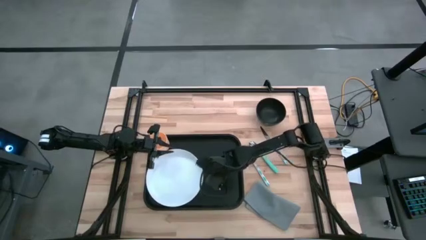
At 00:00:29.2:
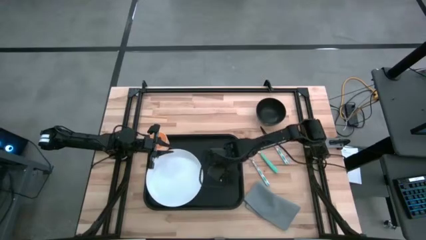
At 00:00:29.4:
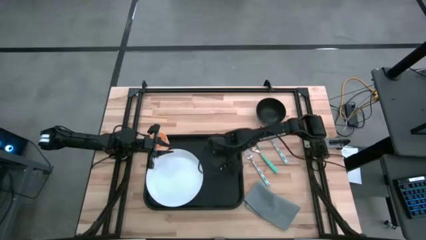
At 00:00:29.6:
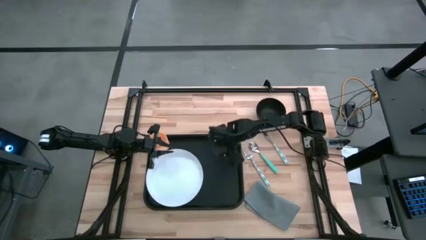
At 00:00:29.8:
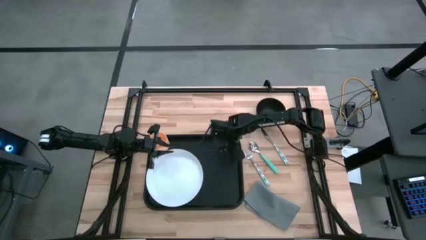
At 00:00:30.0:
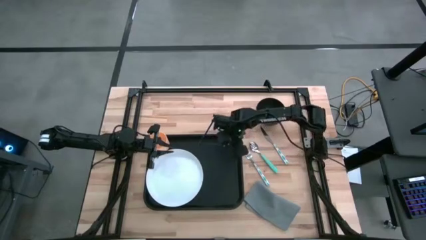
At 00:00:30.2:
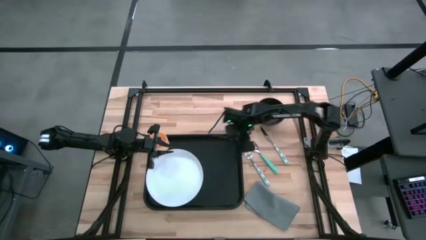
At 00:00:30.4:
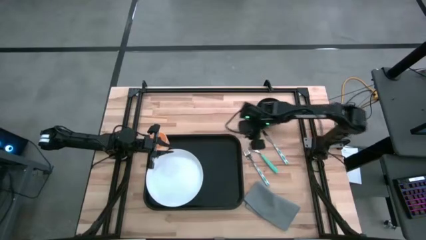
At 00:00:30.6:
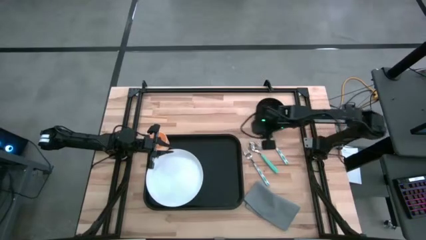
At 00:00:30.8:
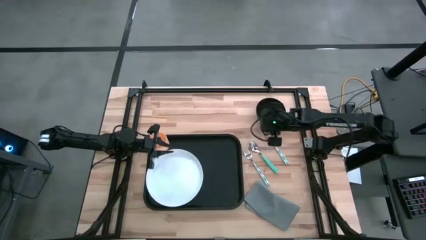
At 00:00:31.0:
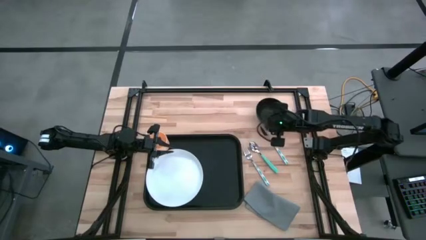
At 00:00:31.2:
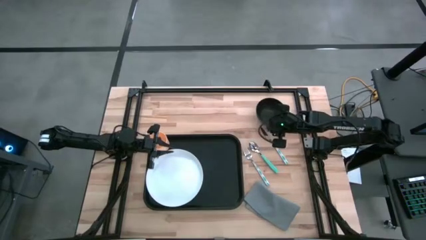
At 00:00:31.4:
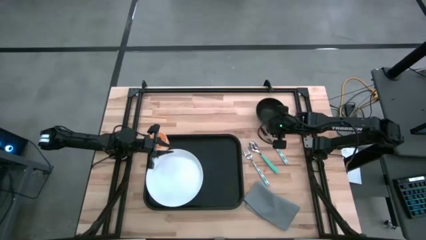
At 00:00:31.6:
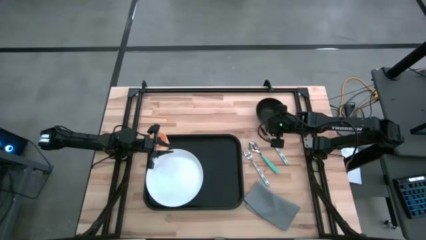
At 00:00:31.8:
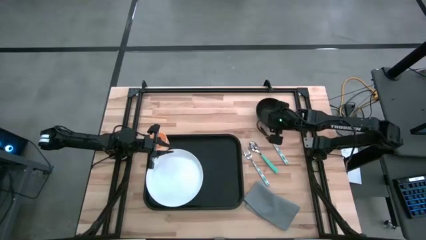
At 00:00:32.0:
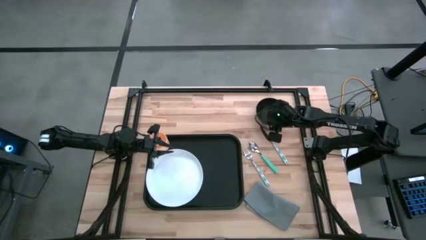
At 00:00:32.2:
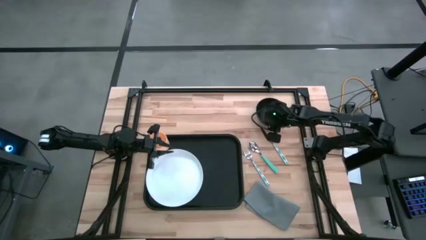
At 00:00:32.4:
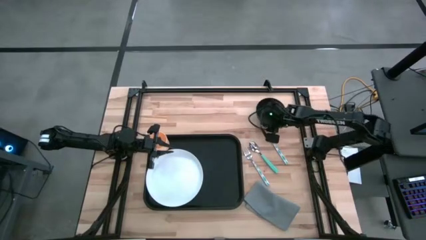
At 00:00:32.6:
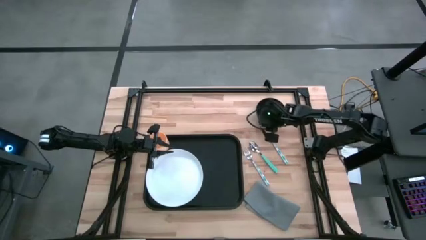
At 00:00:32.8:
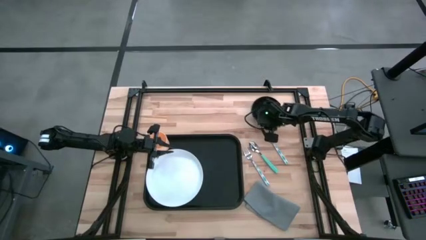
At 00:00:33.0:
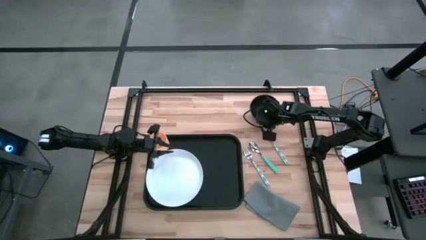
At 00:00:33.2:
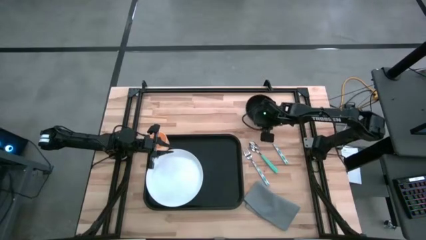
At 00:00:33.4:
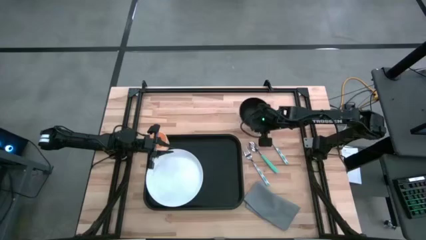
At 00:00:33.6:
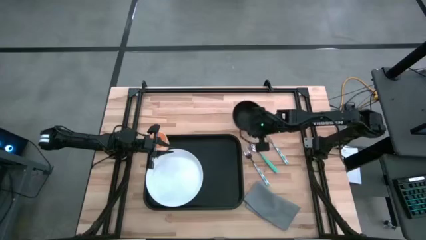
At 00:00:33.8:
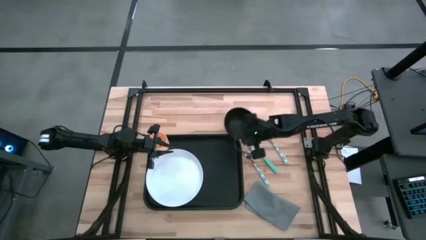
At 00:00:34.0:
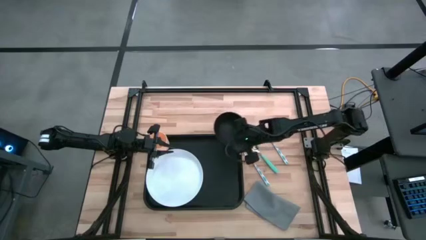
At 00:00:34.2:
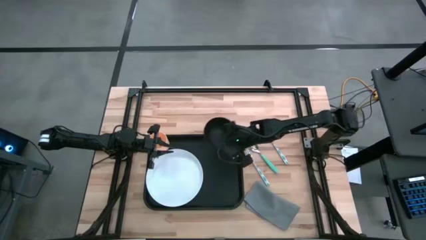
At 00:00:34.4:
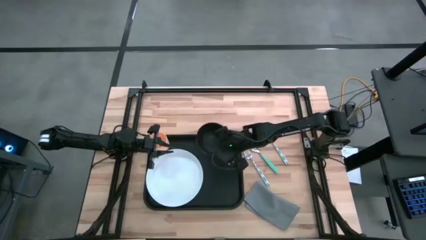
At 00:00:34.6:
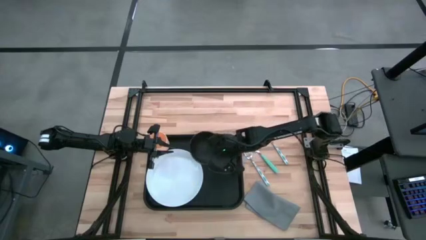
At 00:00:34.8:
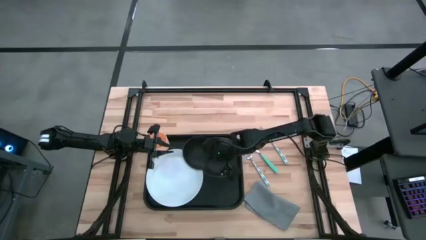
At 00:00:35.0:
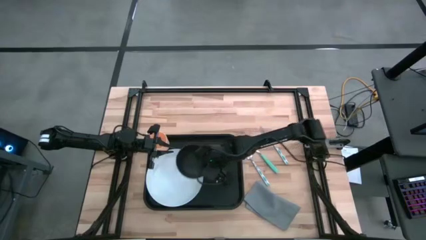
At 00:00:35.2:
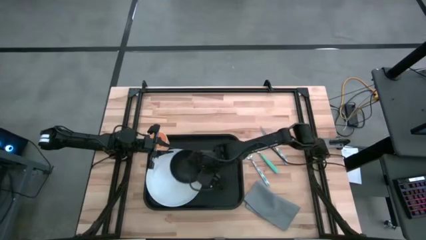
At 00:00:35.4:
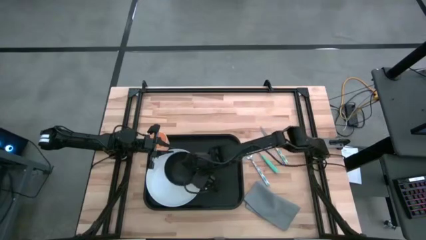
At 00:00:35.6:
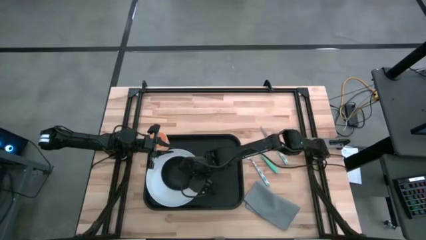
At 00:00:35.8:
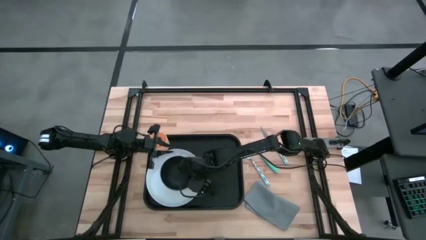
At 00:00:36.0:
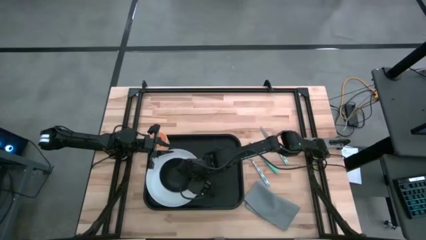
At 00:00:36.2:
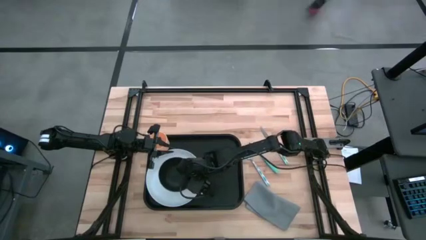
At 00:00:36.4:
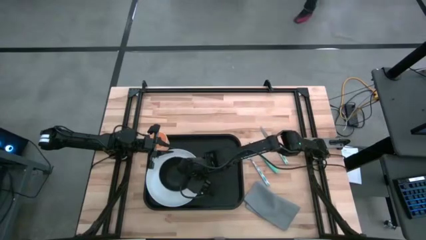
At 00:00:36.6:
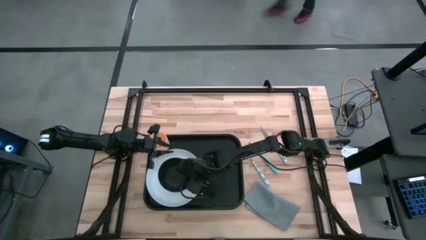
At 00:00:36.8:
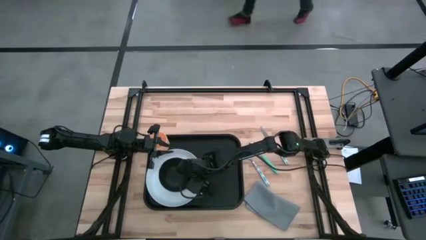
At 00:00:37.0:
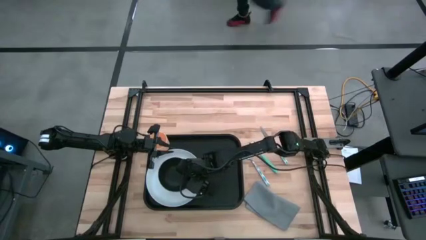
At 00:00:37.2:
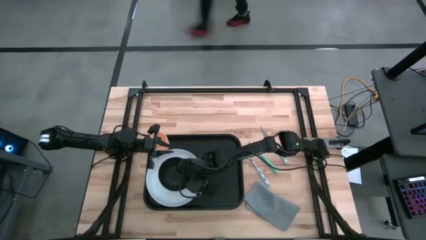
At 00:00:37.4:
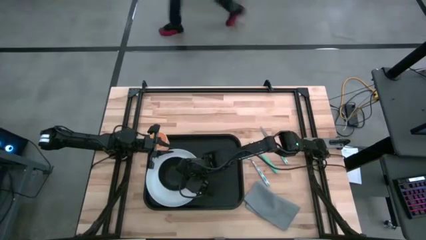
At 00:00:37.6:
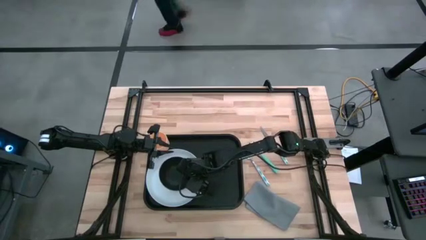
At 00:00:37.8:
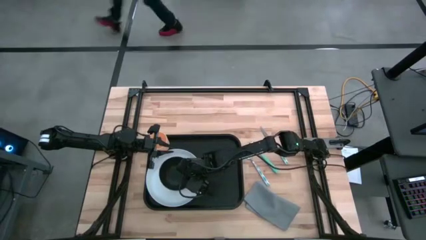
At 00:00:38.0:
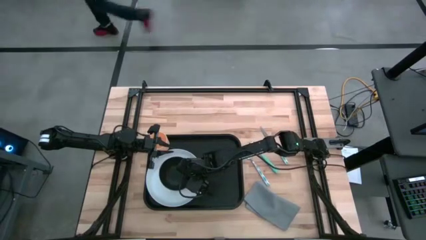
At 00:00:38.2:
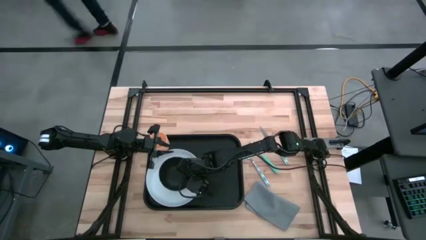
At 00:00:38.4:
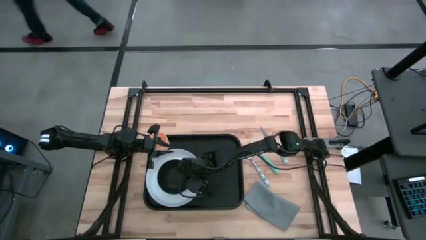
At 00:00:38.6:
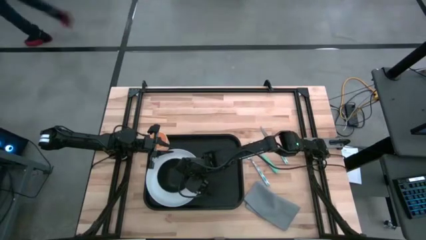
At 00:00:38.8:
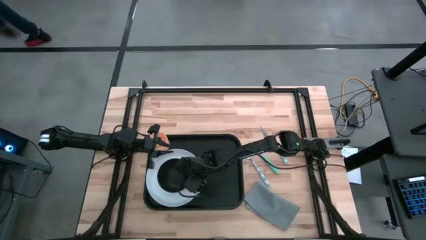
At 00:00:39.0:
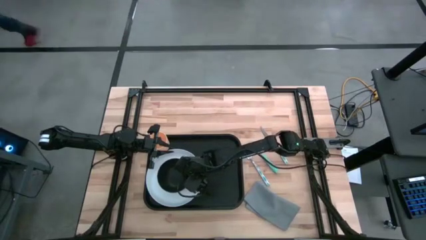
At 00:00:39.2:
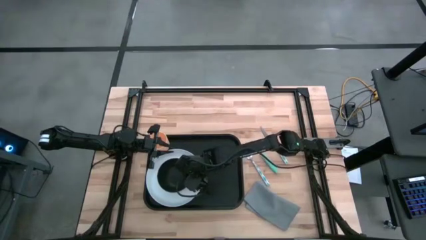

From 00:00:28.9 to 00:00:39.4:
Task: Set up tray
Put the black bowl on the plate
